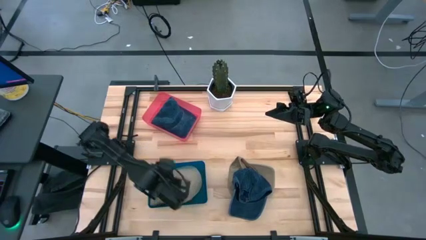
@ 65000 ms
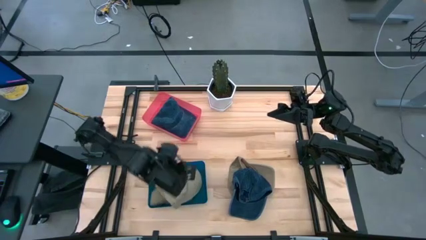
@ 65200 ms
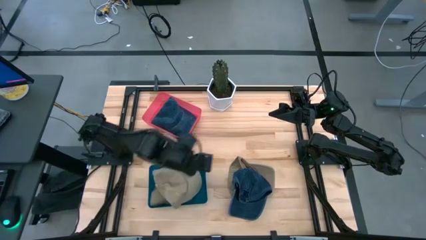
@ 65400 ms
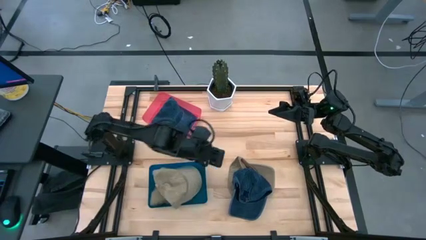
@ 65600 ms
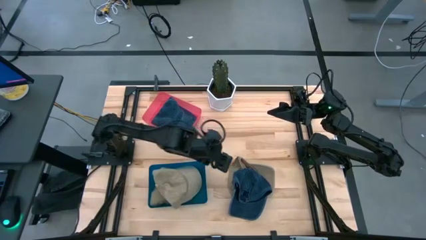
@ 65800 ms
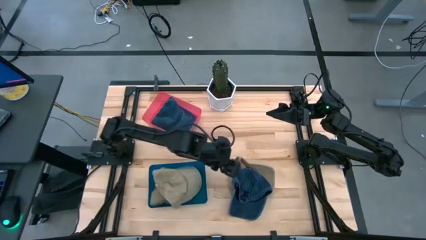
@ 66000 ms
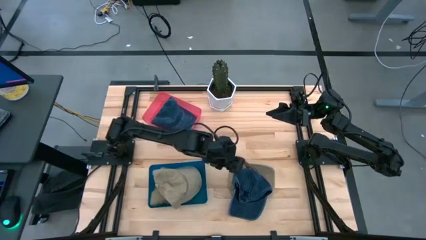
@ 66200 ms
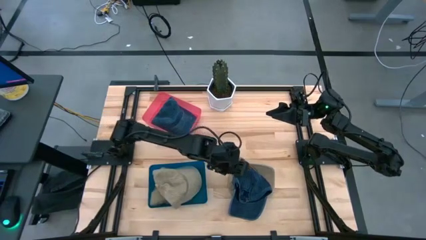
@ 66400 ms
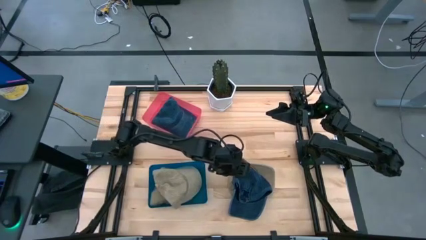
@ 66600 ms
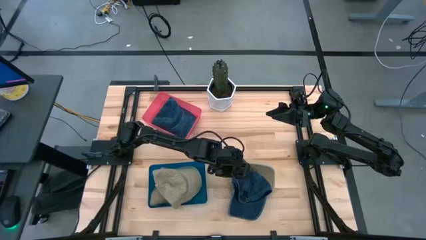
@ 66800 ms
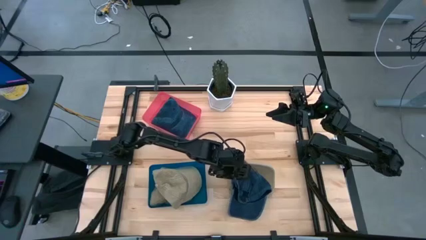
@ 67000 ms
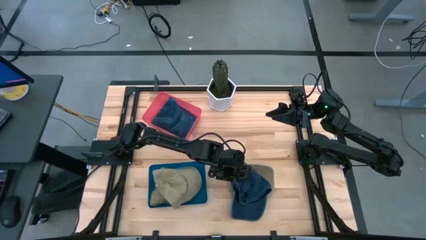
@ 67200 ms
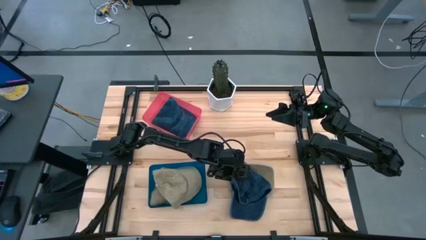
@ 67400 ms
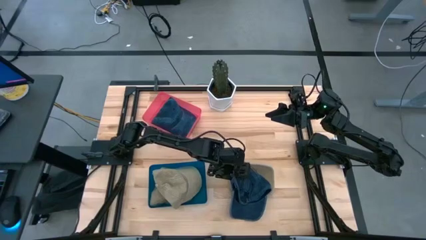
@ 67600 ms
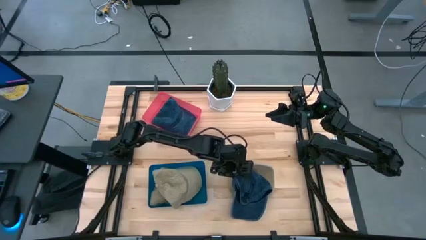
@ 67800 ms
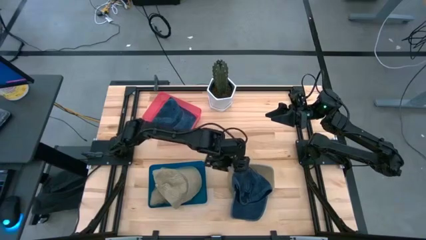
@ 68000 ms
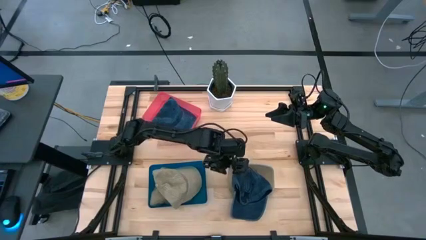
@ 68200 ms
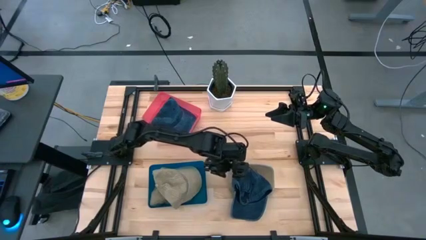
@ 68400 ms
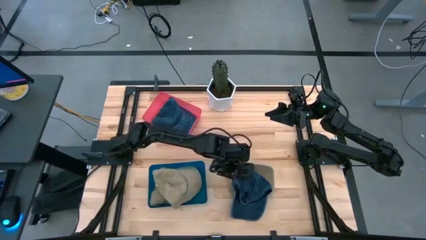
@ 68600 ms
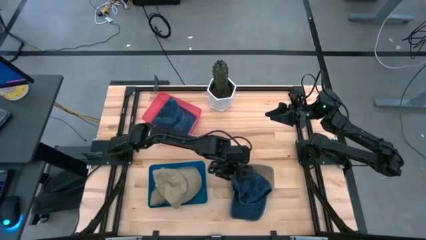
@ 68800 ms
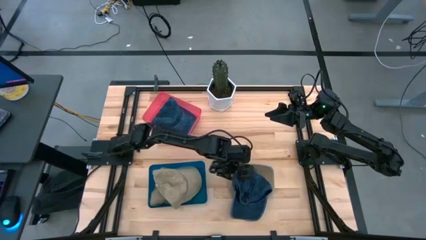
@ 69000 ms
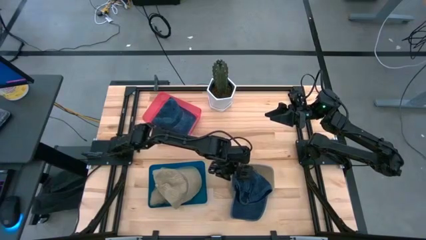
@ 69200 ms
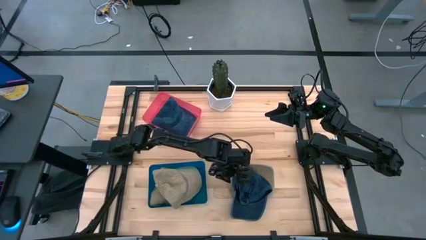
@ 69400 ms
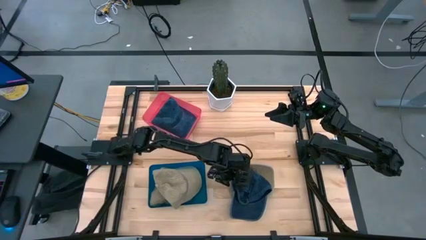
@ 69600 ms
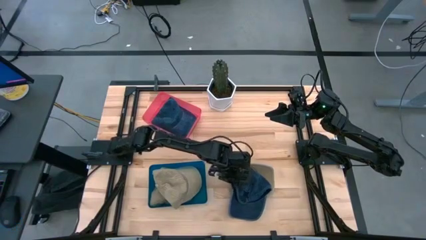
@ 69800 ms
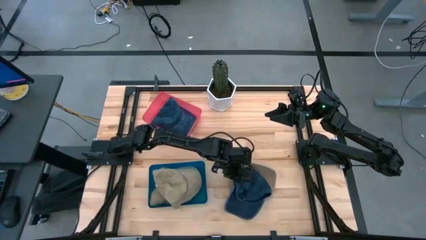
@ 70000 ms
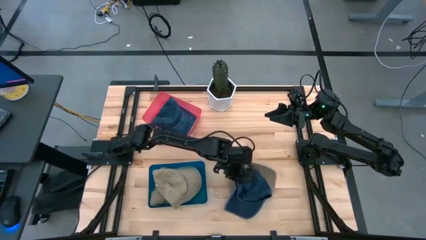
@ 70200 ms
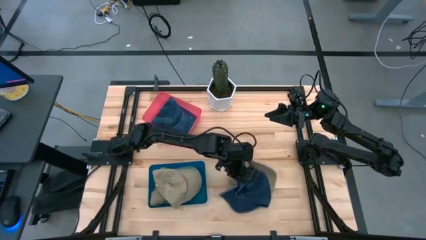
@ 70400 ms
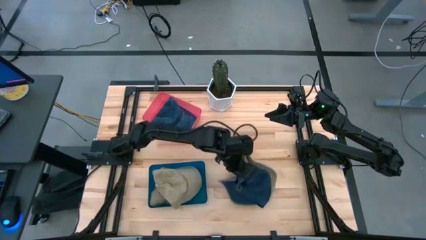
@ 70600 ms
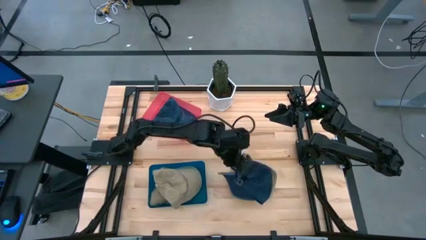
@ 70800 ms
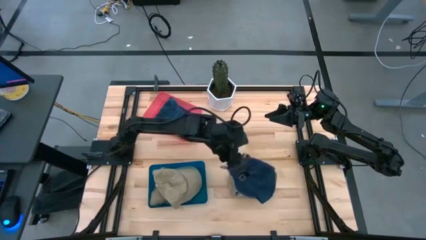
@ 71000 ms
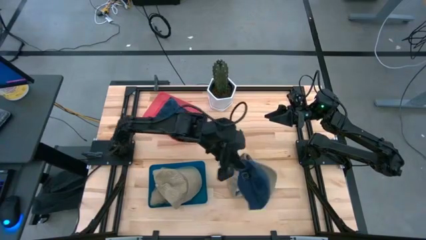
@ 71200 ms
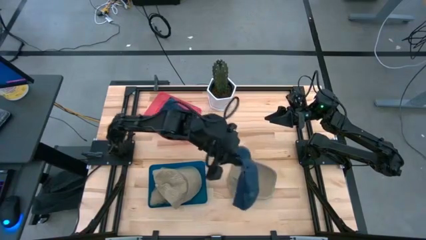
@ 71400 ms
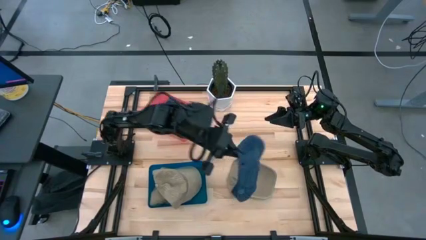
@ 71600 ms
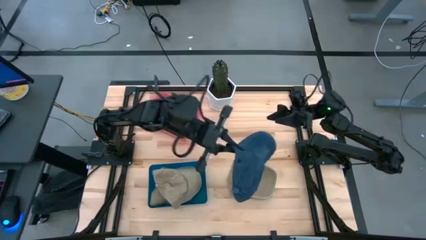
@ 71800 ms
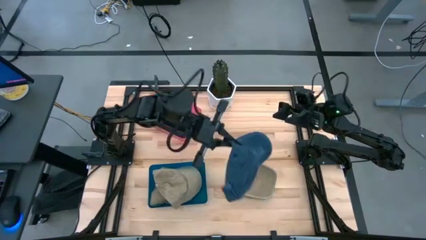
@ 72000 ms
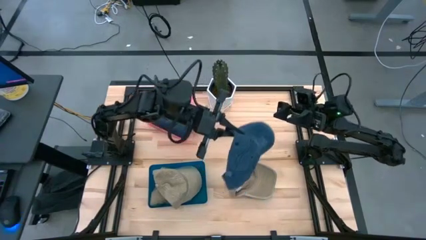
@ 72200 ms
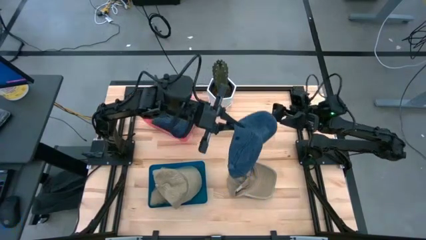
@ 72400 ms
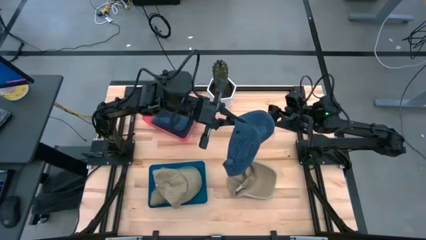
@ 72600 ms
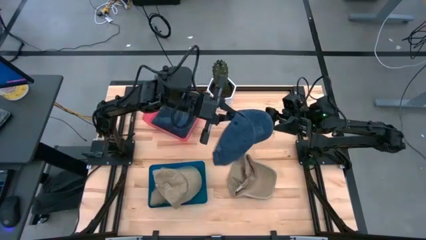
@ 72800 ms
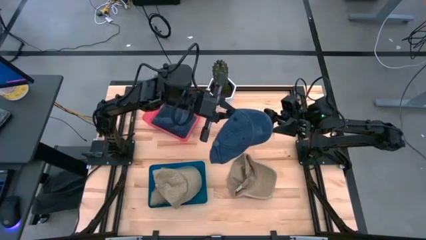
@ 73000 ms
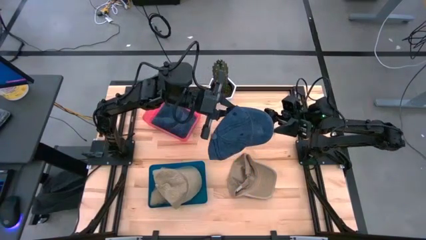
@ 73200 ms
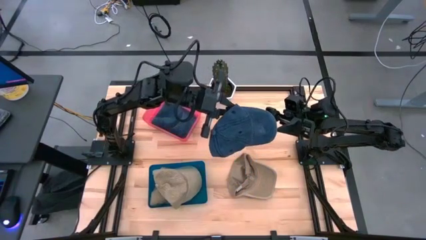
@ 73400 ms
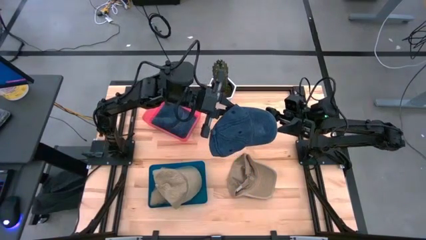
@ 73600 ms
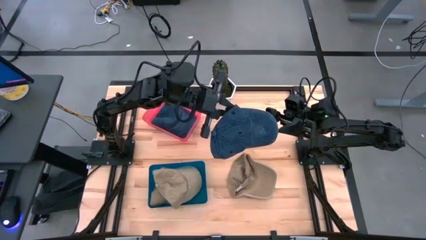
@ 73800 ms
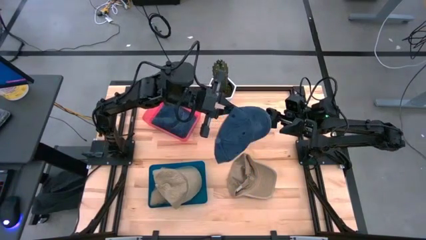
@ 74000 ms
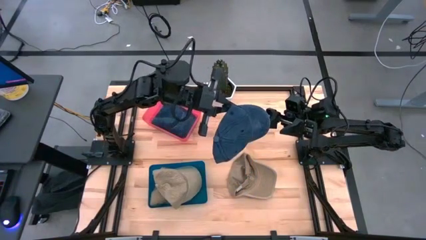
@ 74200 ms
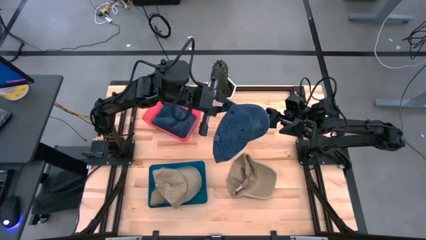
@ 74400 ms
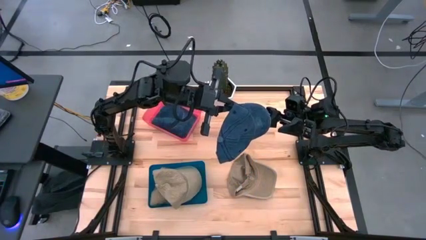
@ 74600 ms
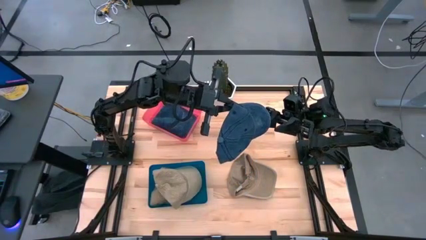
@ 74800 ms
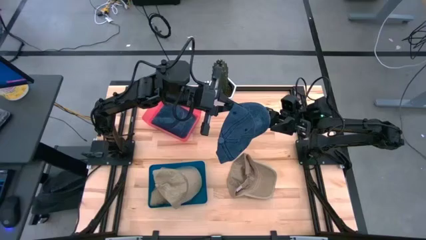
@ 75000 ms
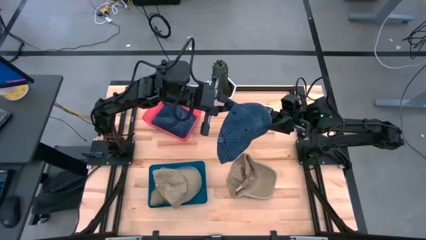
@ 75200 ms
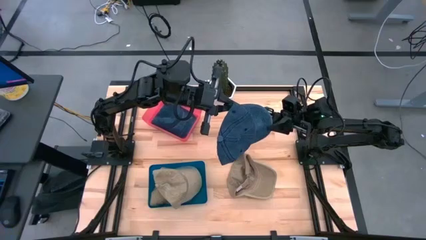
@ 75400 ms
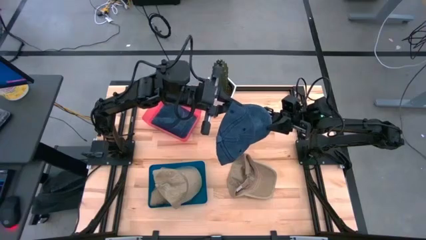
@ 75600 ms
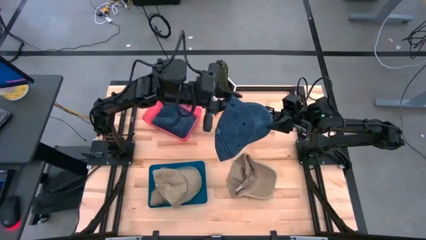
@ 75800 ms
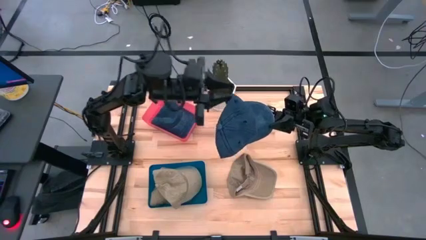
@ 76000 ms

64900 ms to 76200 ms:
Task: Pick & Place hat
Put the blue cap into the pink bin
